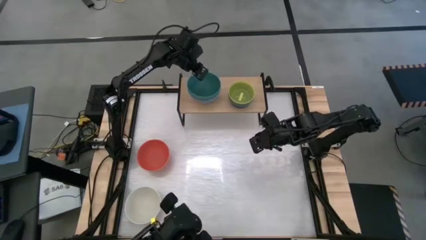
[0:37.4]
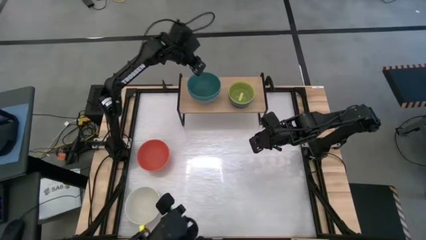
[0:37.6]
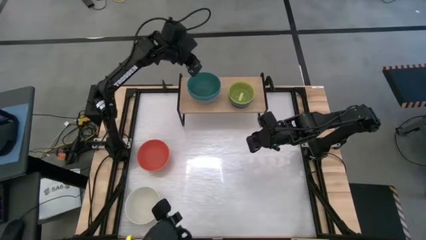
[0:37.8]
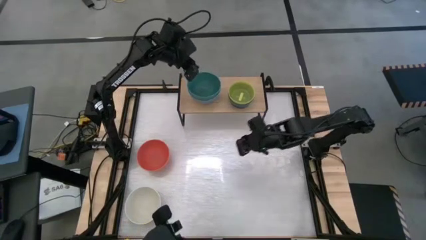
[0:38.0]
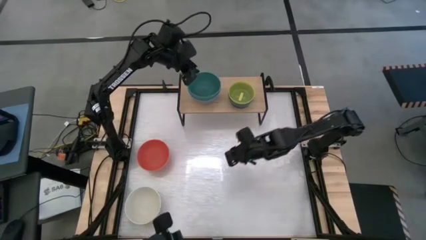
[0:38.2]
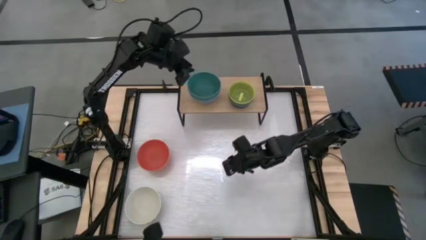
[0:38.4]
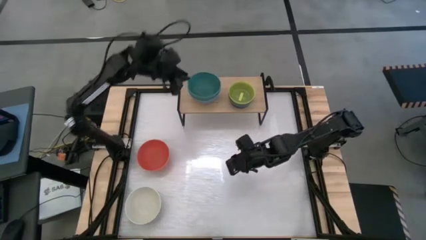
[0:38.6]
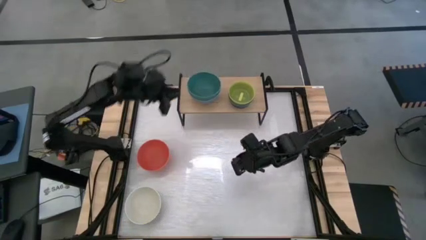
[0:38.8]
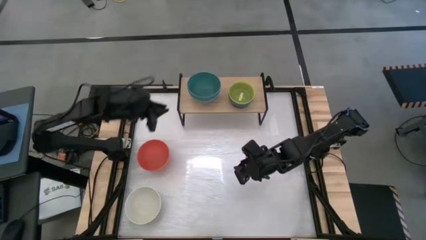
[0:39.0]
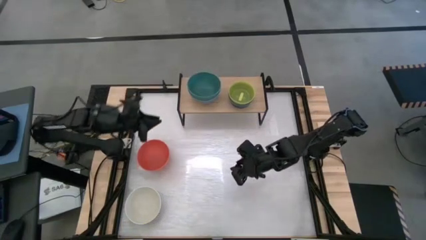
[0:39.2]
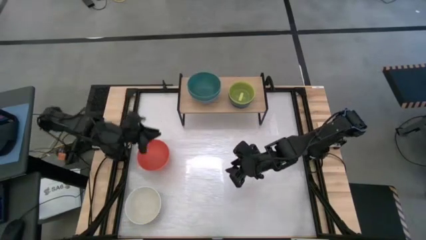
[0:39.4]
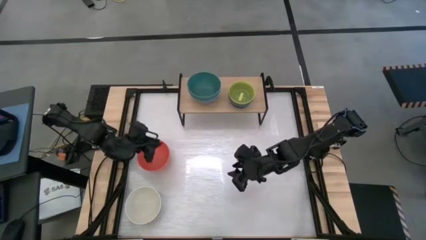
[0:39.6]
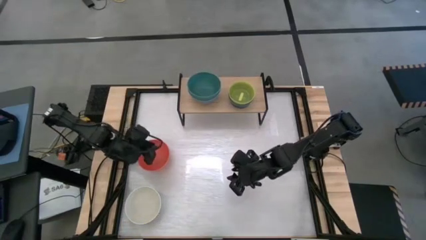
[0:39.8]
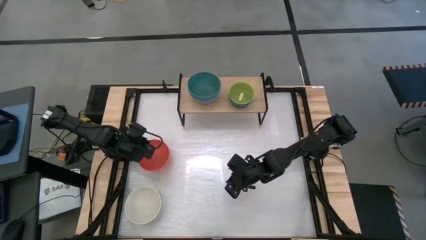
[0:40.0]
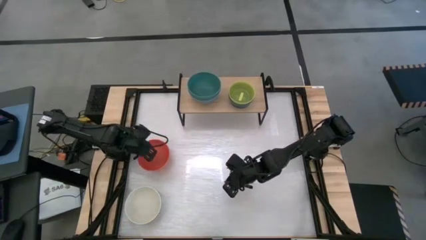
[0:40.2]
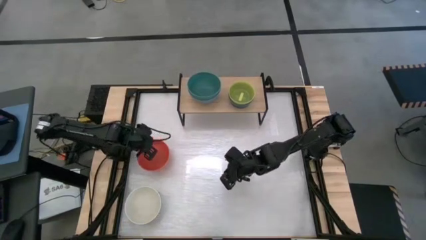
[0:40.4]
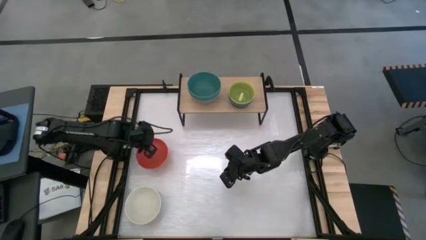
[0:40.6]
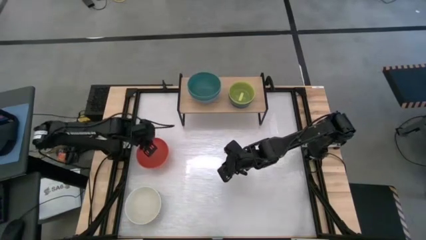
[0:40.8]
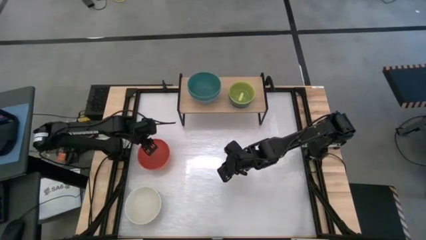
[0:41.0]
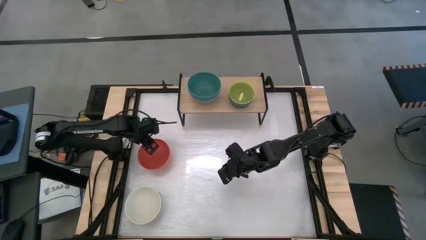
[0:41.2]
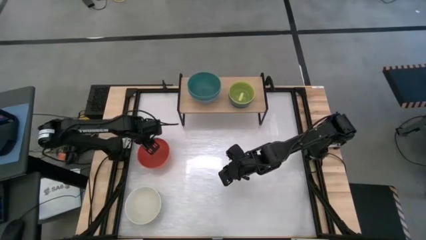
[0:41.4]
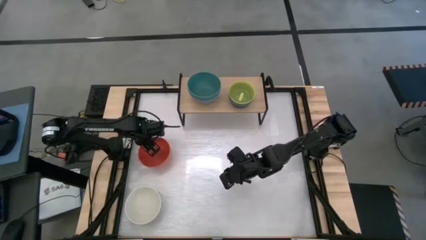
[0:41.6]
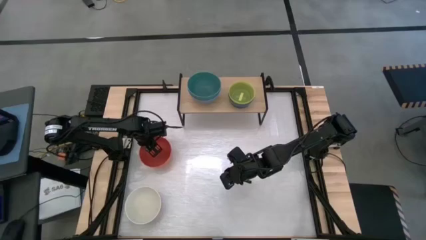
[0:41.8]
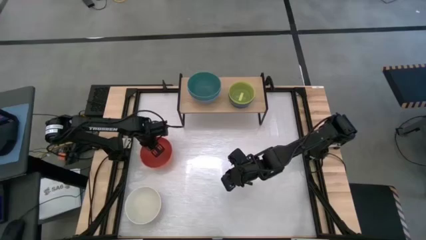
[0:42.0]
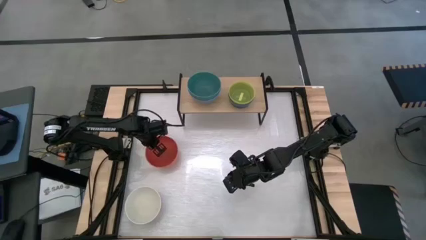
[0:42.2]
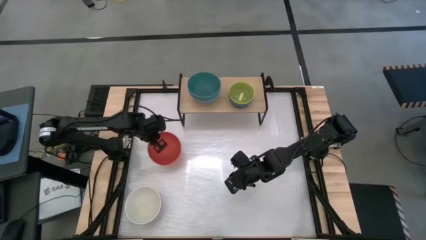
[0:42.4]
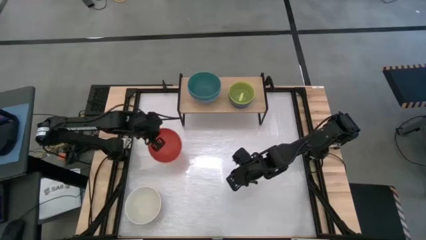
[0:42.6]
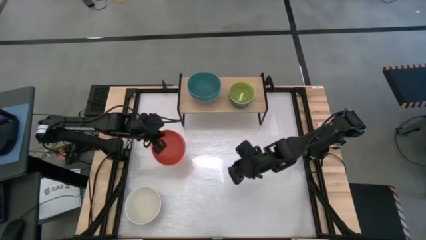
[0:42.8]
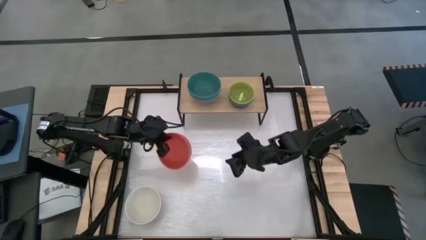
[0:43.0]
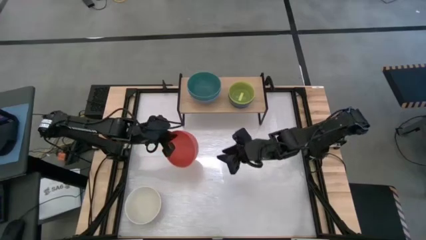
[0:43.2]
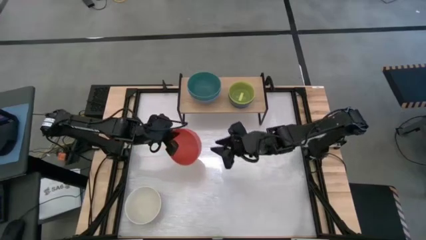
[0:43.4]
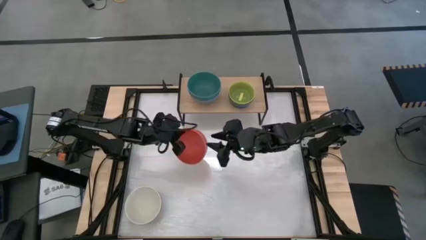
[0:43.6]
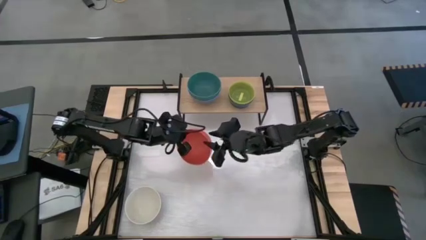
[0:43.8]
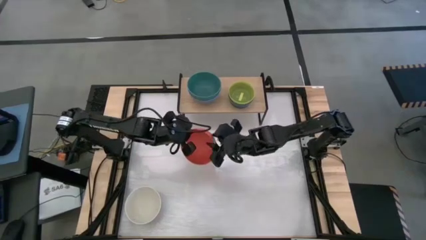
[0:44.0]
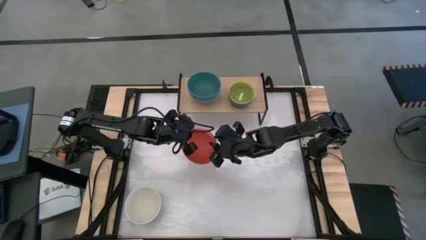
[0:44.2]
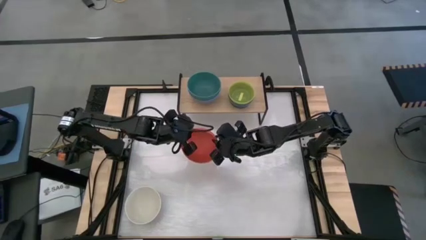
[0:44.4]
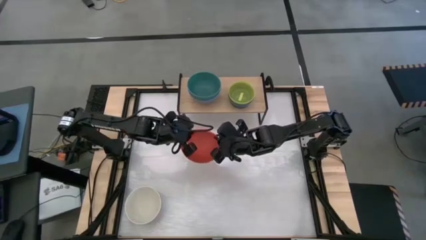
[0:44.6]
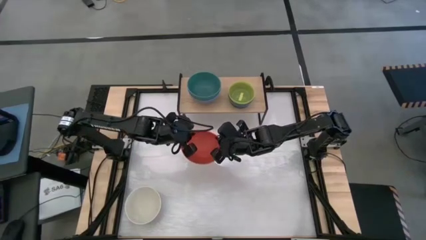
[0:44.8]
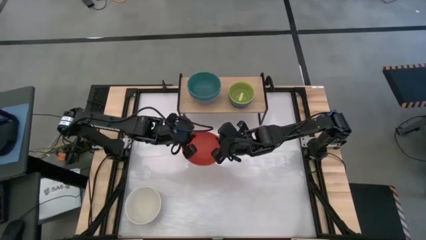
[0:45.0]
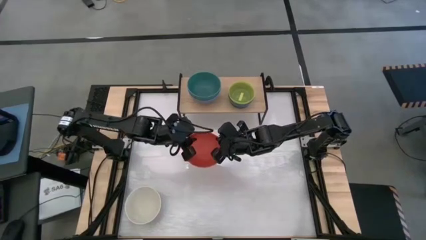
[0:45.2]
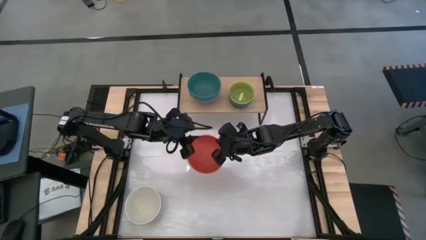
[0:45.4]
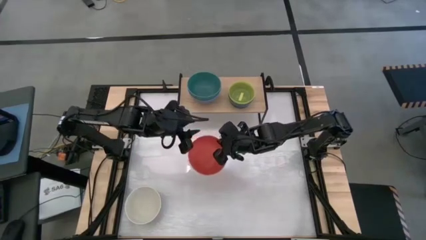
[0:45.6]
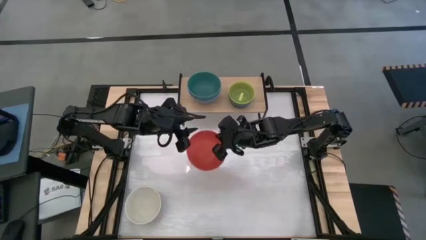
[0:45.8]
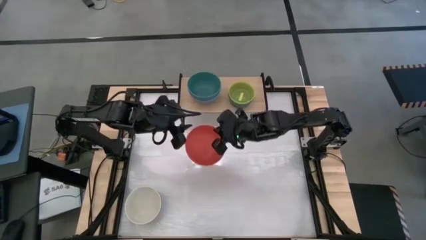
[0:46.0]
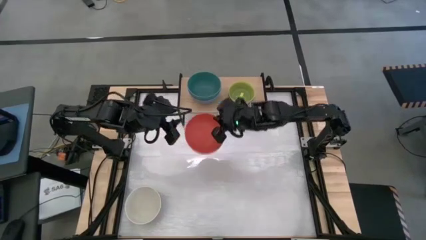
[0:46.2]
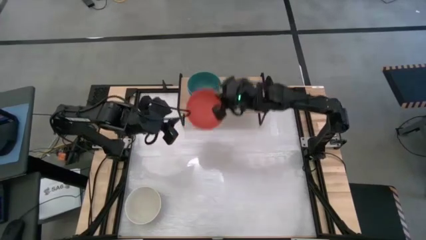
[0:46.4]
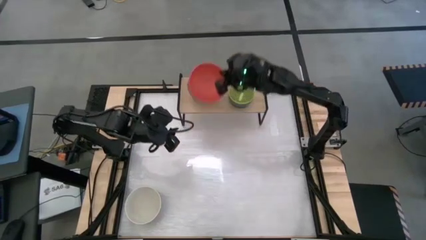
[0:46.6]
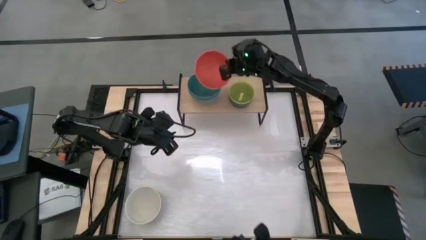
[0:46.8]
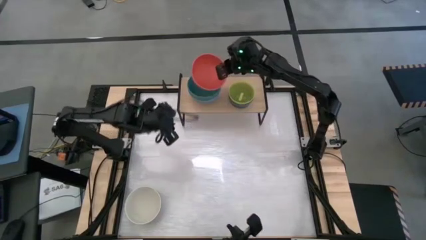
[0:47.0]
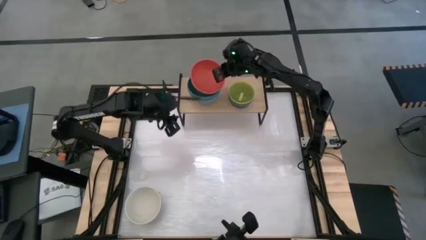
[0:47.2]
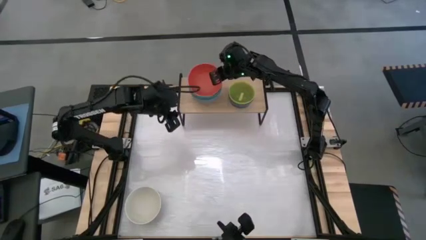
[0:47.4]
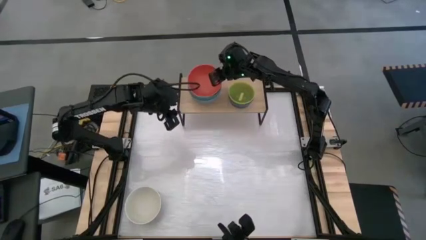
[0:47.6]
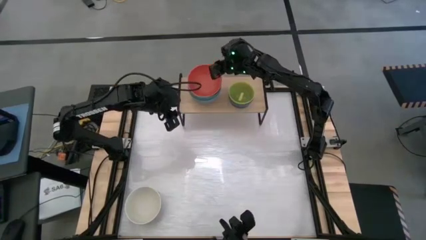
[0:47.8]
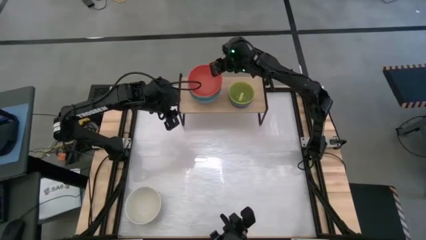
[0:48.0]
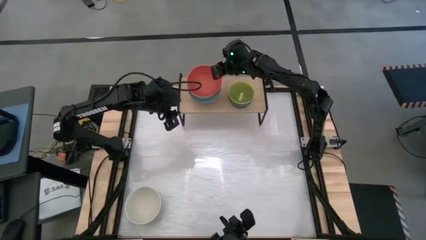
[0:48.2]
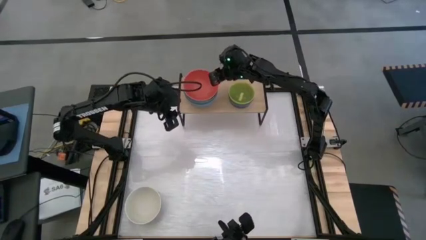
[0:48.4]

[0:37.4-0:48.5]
Task: Place and stack bowls onto a shelf
Stack the orange bowl on top of the green bowl on the shelf

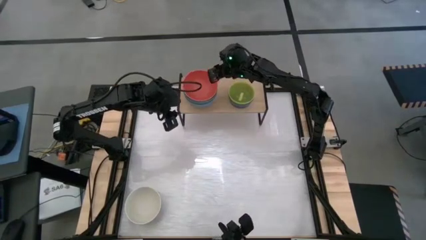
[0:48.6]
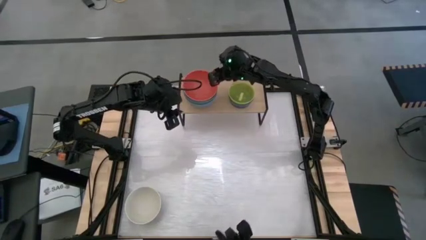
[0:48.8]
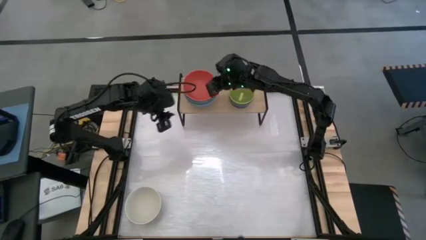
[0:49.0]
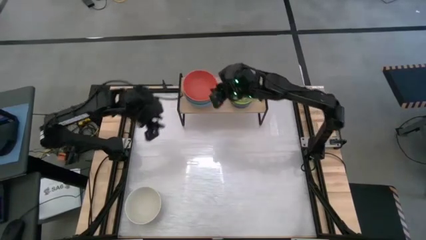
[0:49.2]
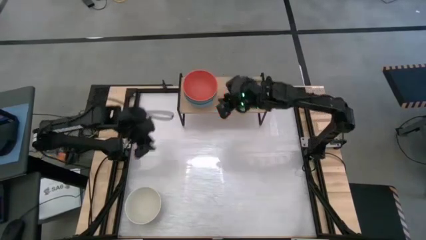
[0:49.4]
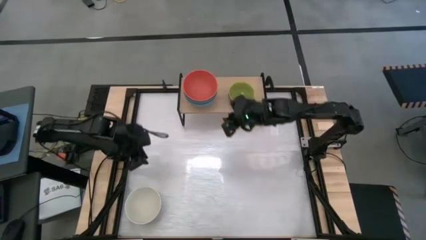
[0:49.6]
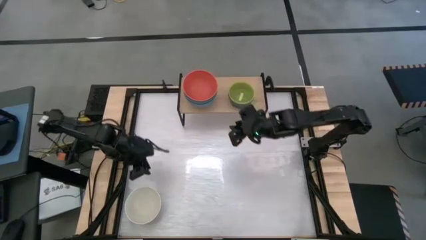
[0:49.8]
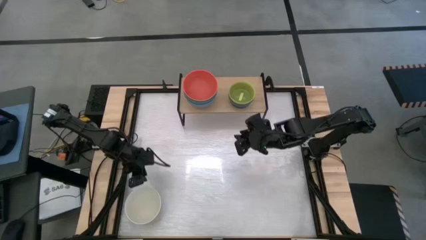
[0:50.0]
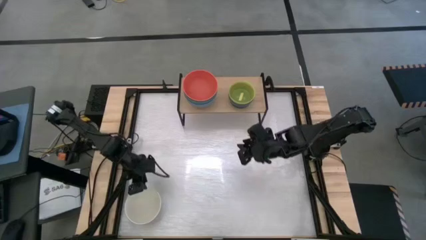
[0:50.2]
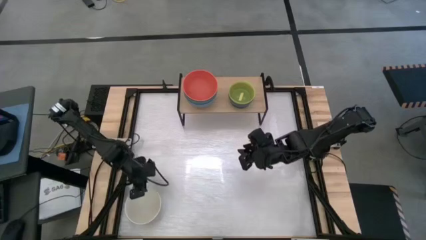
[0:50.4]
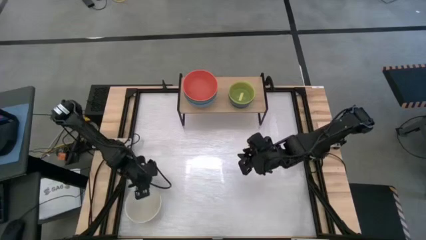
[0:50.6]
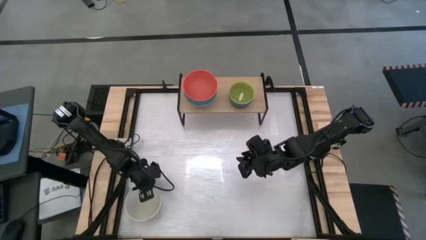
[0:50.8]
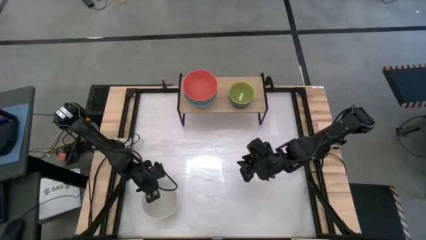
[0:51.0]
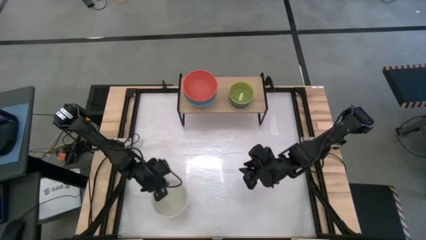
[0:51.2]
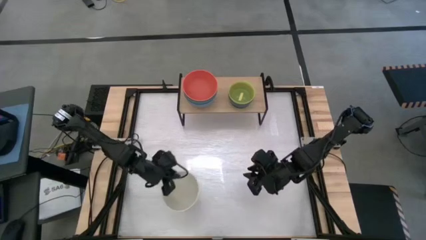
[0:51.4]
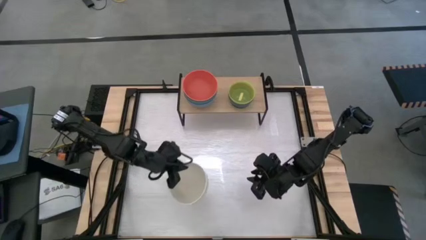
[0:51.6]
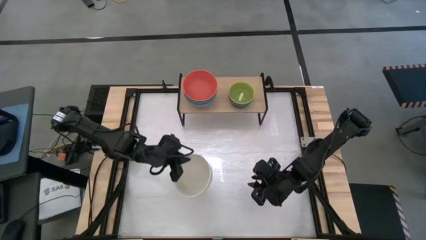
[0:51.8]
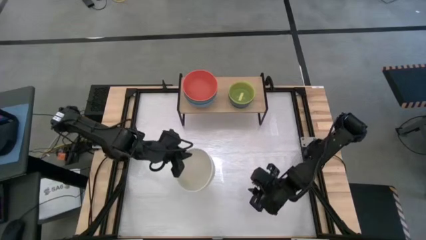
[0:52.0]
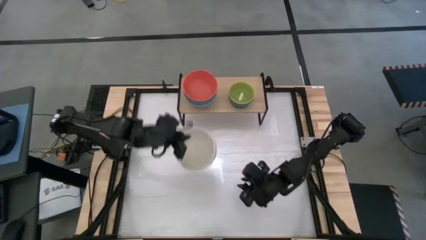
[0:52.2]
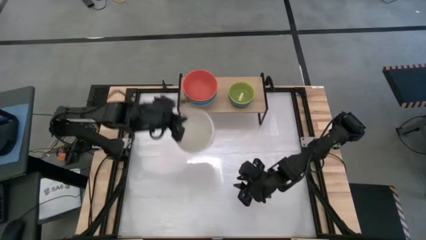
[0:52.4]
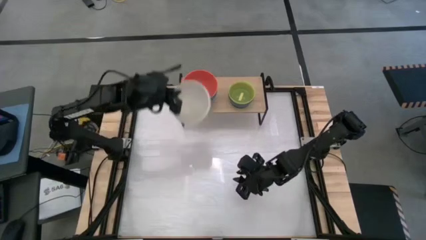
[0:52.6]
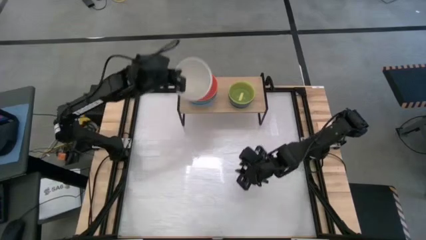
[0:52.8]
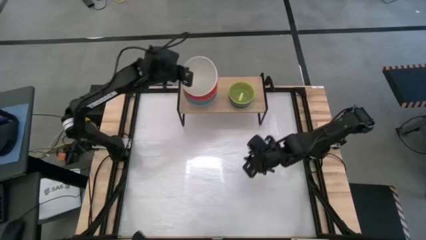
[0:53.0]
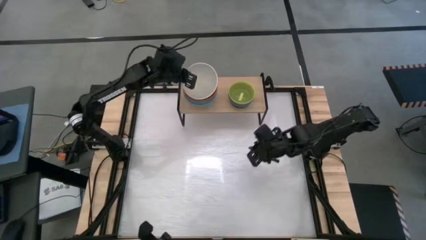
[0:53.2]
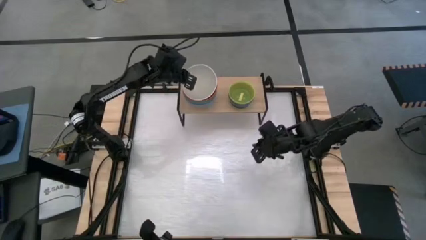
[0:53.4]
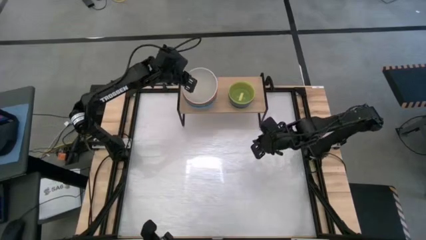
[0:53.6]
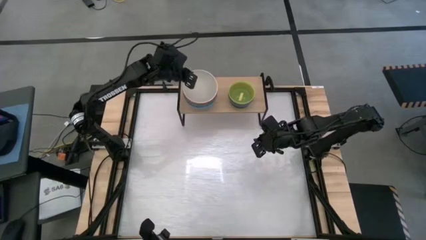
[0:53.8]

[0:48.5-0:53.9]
Stack the white bowl on top of the orange bowl on the shelf
